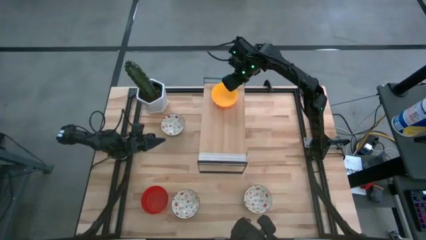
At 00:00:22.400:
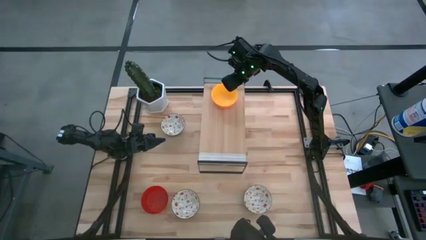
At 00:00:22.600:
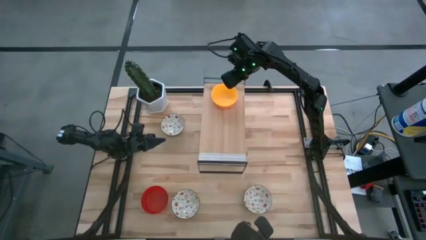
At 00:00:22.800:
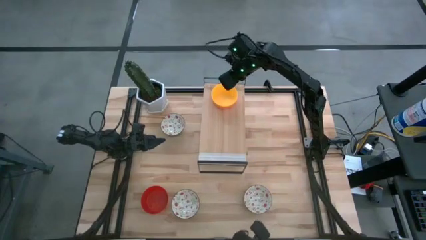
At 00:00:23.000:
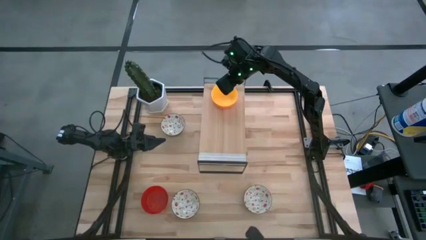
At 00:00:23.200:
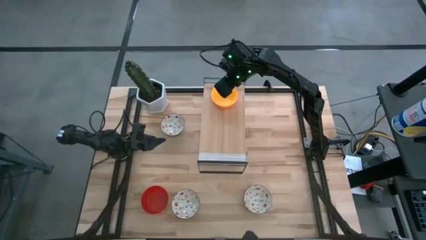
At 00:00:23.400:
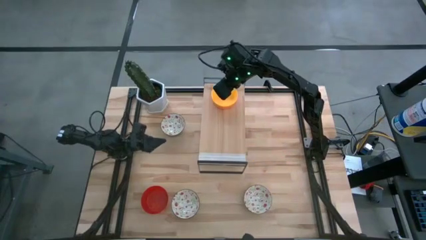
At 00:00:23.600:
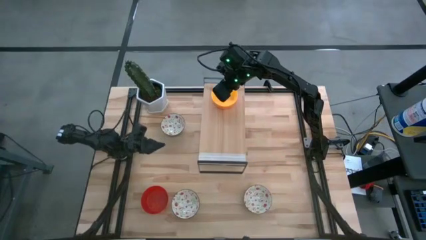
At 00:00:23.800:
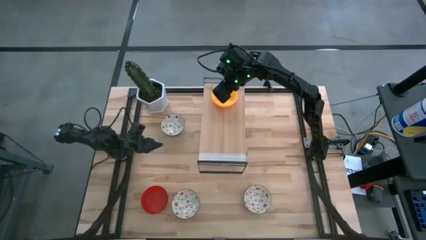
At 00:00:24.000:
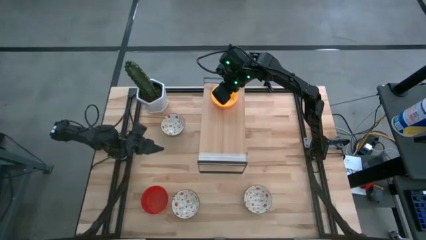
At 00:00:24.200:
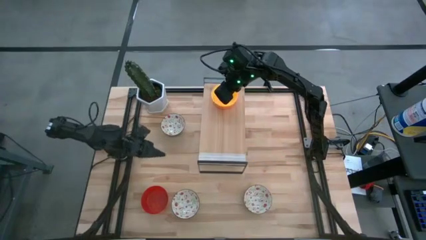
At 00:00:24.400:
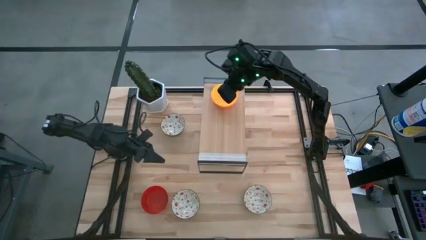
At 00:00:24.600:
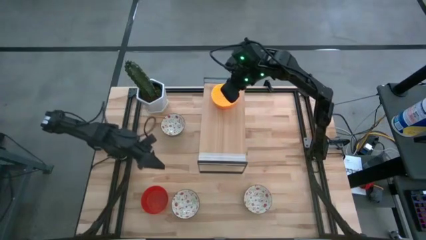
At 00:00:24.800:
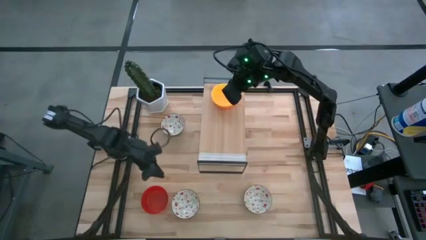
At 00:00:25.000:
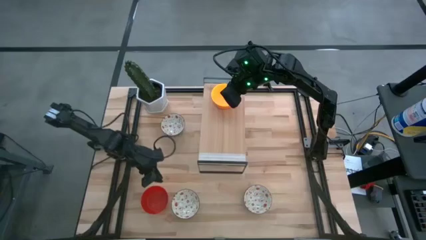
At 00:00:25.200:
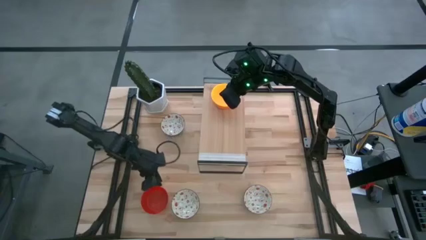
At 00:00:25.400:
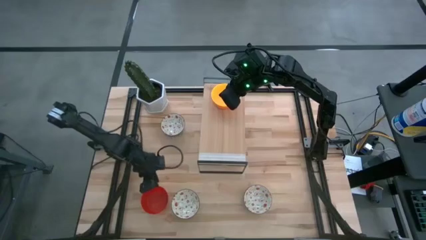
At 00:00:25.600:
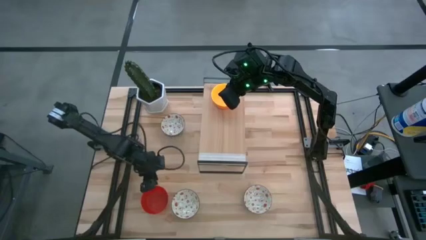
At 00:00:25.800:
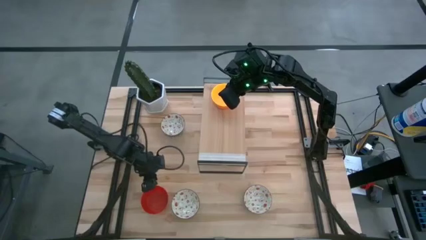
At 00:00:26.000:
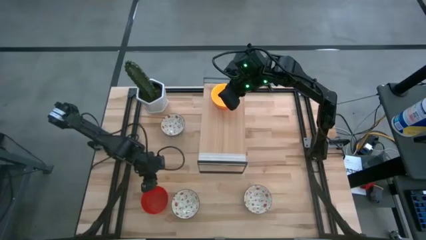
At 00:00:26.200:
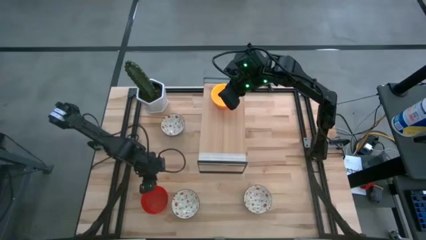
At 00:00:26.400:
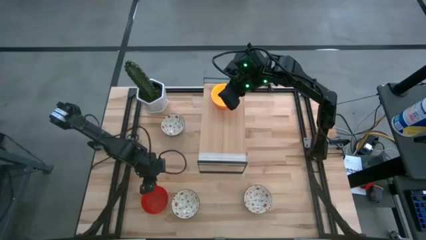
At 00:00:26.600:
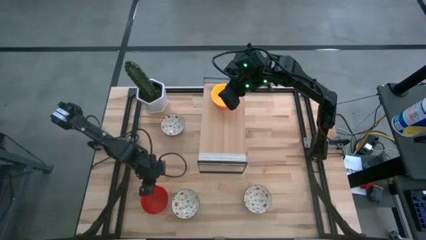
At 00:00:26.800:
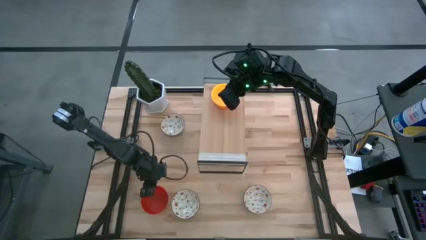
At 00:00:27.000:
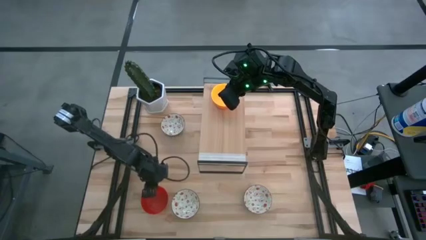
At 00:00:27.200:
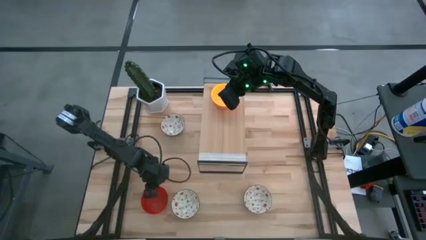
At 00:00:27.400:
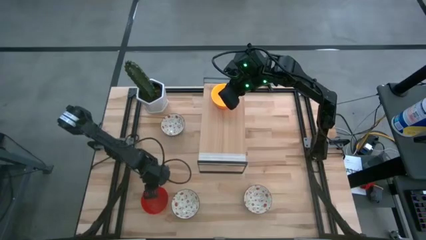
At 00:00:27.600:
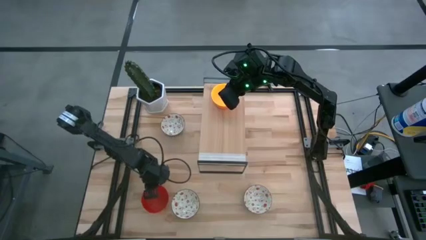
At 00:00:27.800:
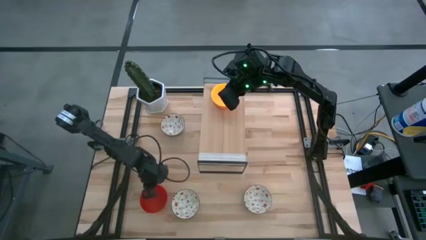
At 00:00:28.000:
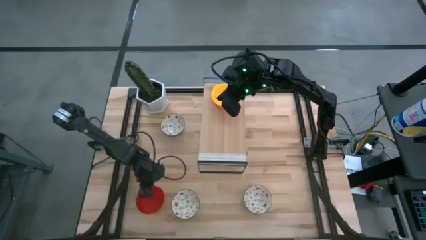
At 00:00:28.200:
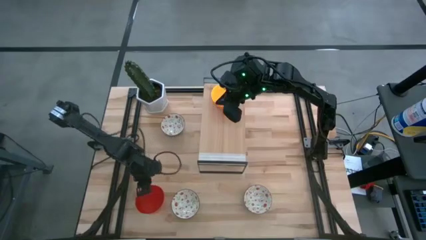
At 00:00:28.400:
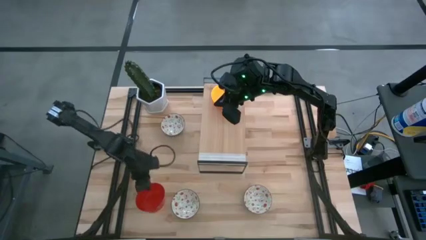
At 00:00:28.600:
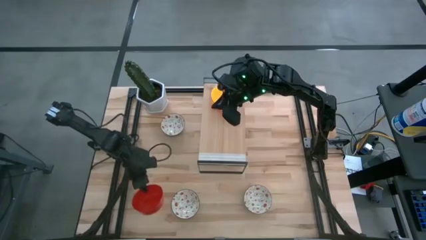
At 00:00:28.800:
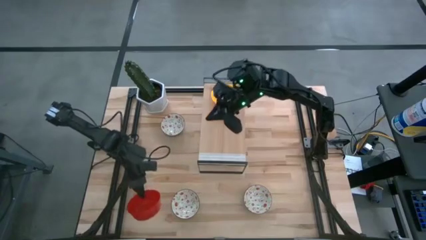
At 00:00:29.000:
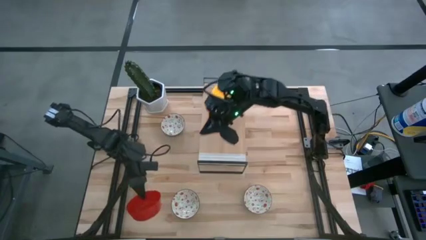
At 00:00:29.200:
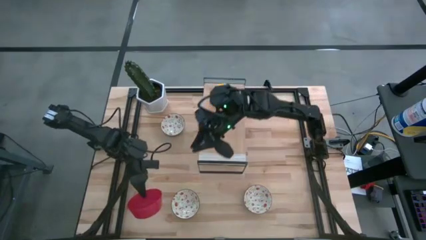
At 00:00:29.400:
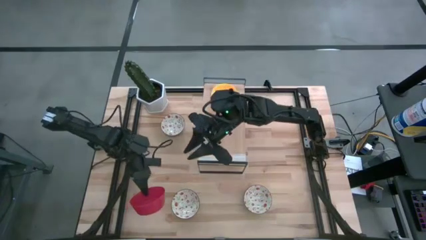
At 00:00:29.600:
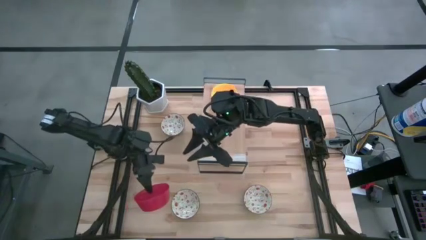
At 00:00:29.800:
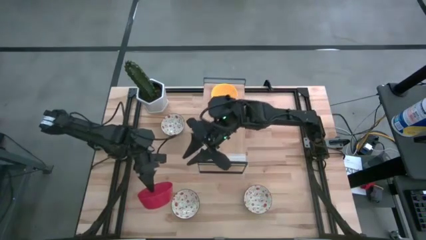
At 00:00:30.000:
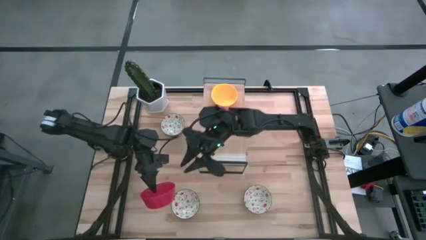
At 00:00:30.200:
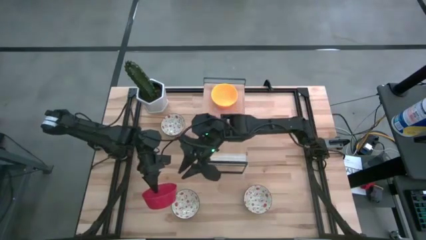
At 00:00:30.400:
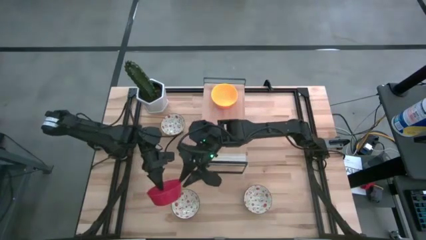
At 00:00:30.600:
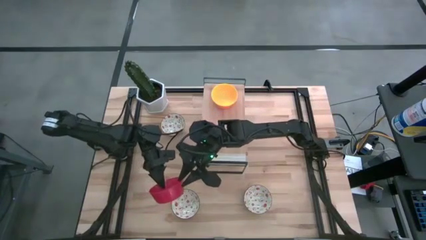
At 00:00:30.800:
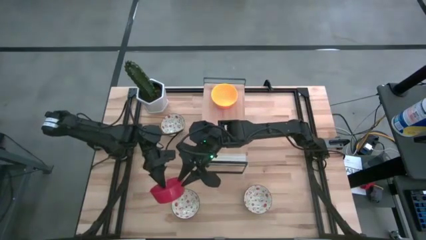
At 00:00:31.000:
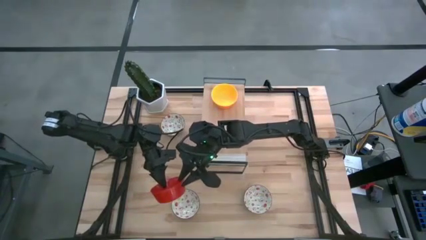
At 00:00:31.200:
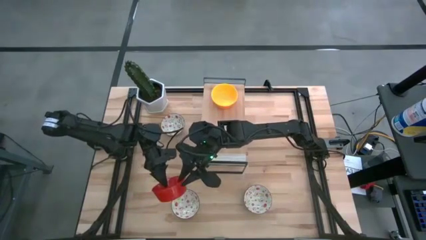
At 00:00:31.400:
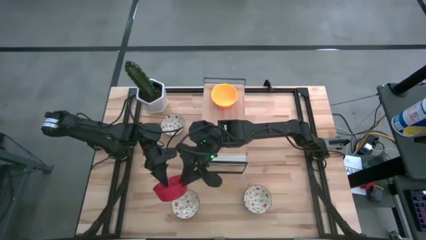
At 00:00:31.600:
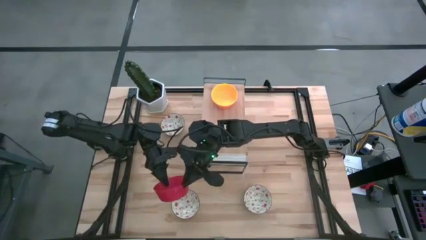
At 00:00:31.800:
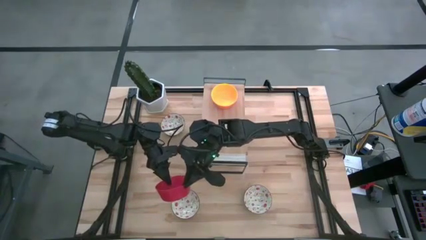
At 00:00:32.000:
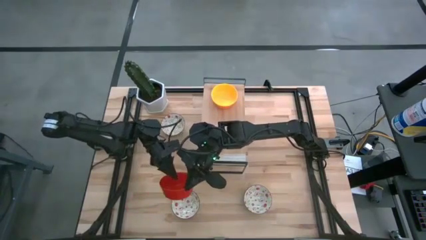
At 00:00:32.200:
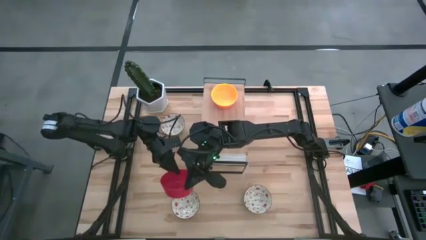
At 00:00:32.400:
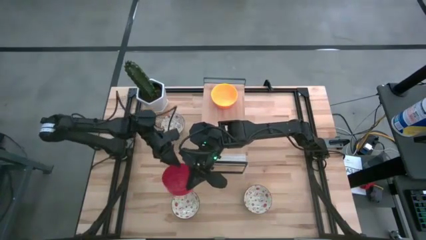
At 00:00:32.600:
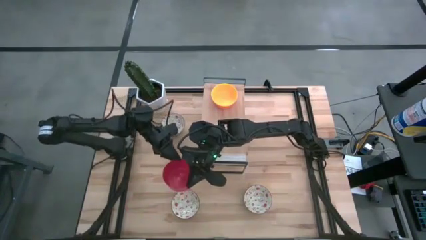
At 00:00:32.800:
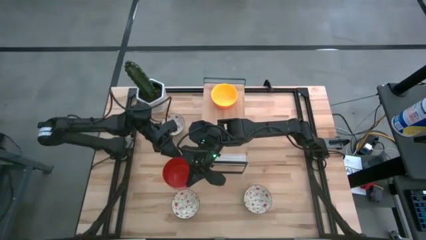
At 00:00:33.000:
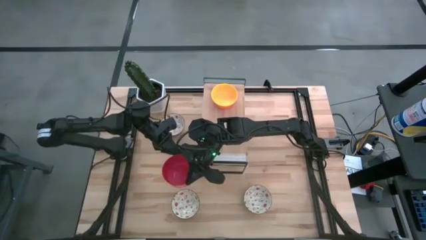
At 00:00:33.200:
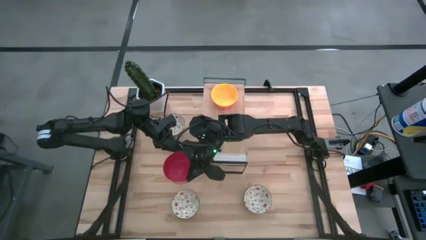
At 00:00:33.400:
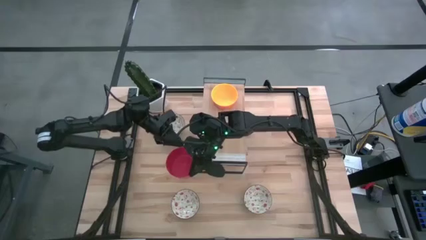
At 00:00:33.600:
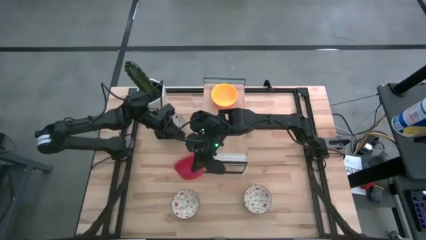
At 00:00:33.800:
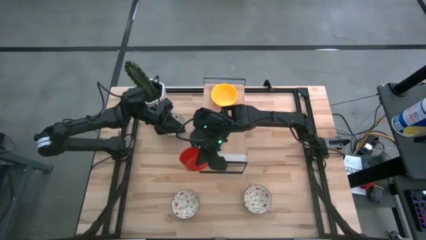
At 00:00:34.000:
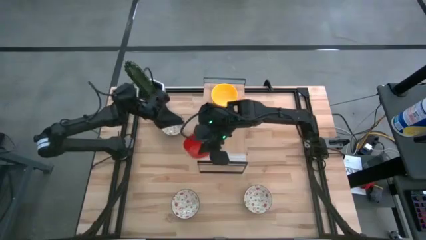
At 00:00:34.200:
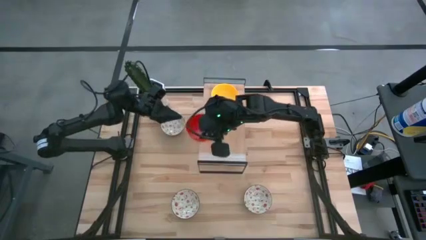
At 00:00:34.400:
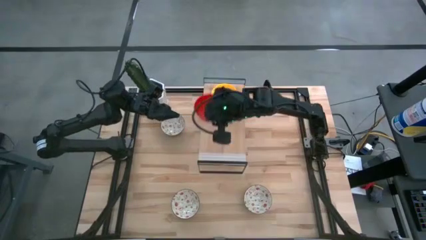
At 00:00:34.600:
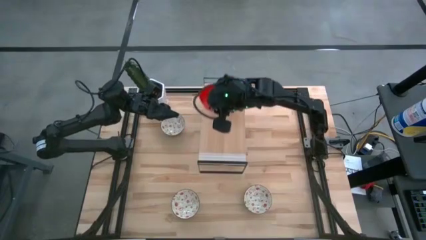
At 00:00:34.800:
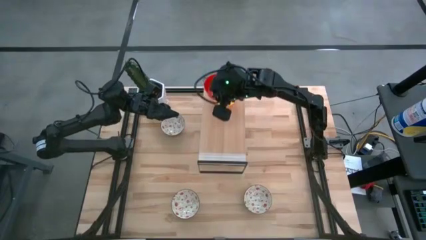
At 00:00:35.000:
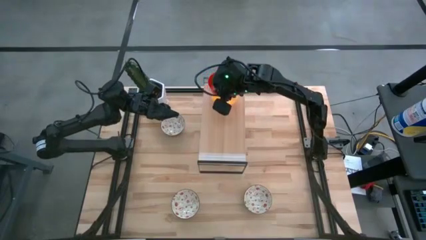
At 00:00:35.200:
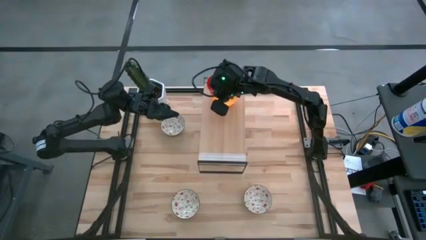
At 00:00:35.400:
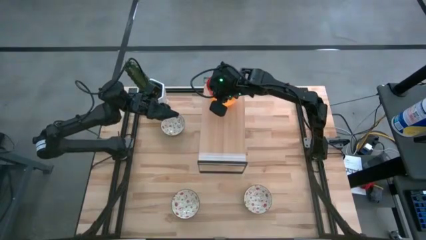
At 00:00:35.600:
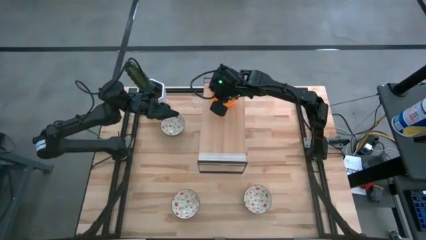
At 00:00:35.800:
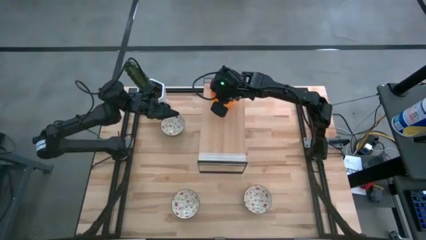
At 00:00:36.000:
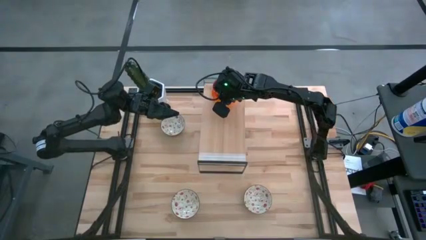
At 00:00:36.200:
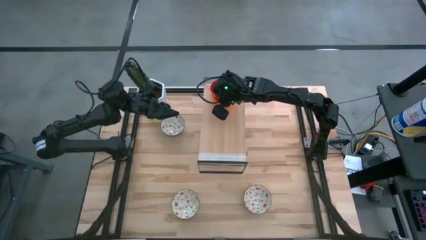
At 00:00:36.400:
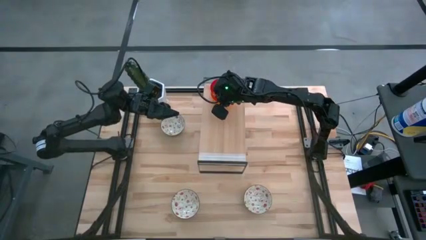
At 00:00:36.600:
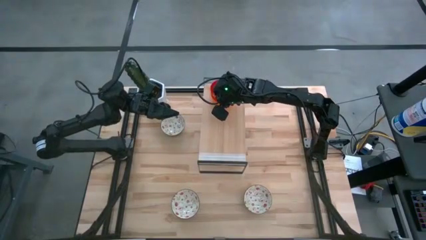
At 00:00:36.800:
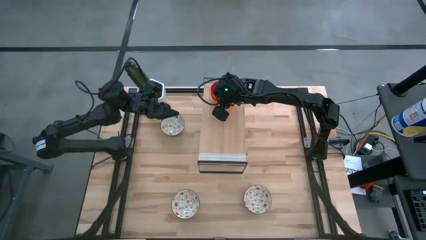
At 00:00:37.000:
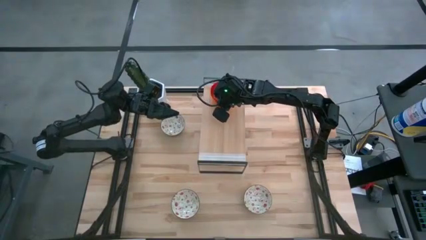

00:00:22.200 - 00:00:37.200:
Task: Pick & Place Mini bowls
Stack the red bowl on the yellow bowl on the shelf
